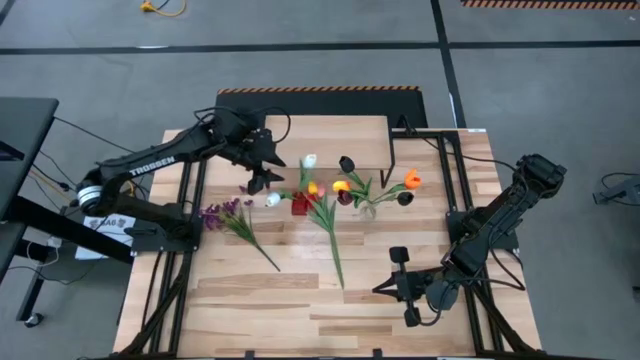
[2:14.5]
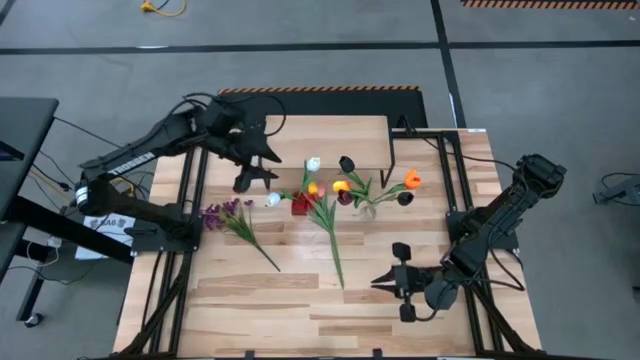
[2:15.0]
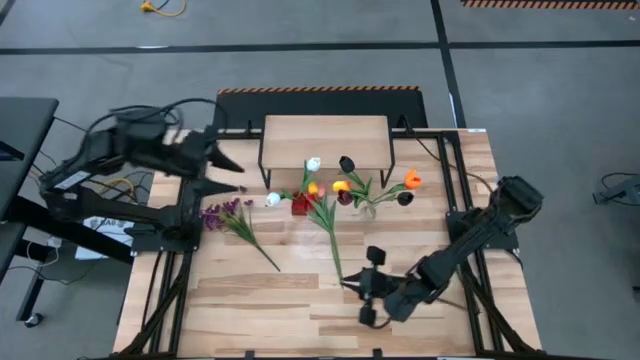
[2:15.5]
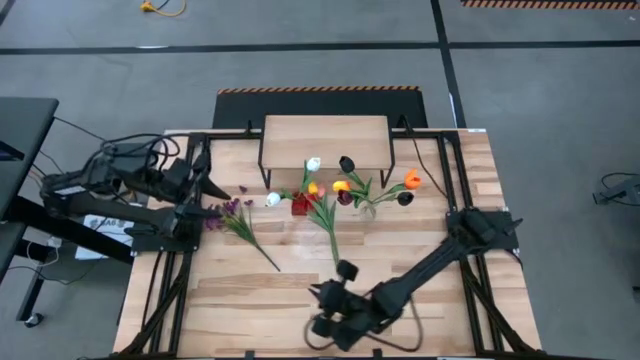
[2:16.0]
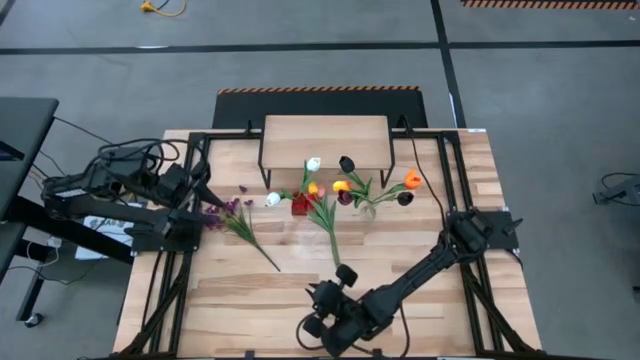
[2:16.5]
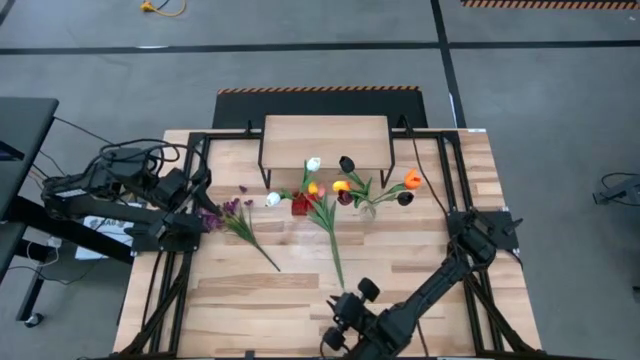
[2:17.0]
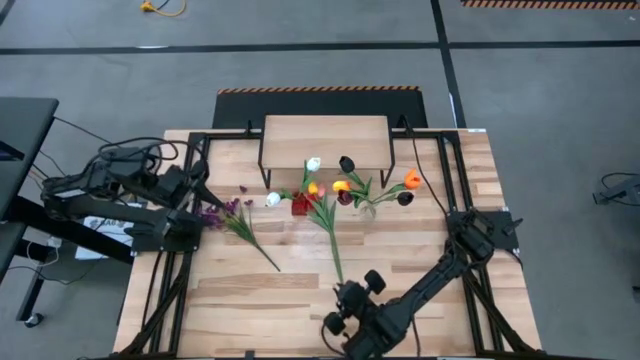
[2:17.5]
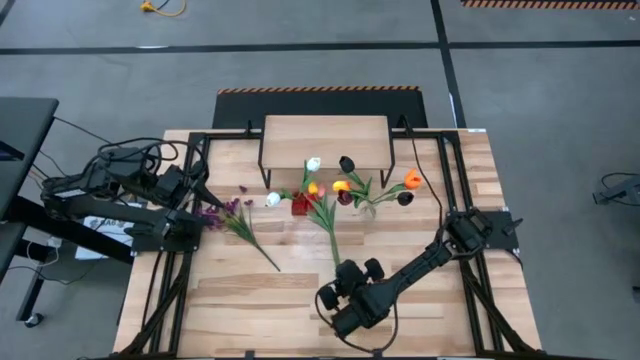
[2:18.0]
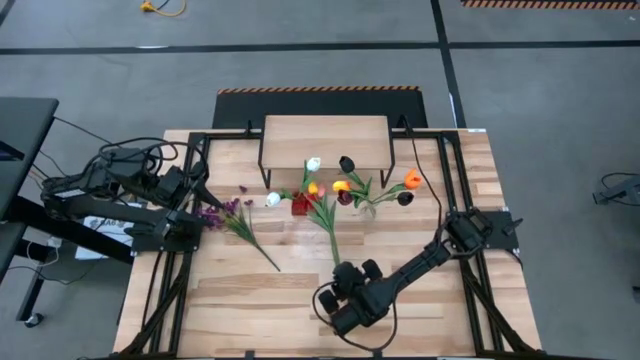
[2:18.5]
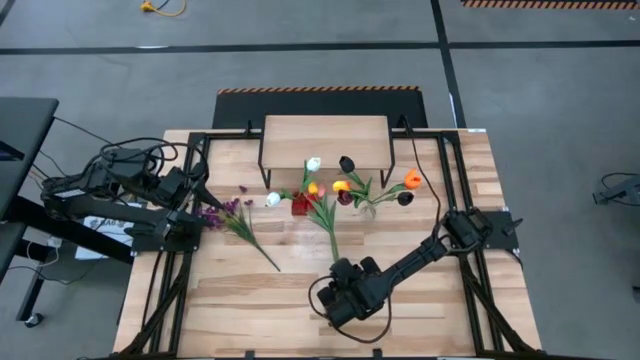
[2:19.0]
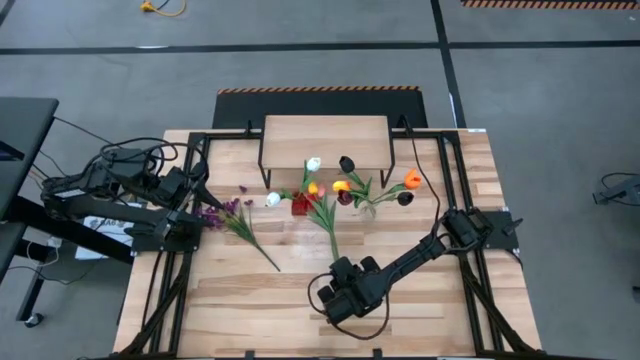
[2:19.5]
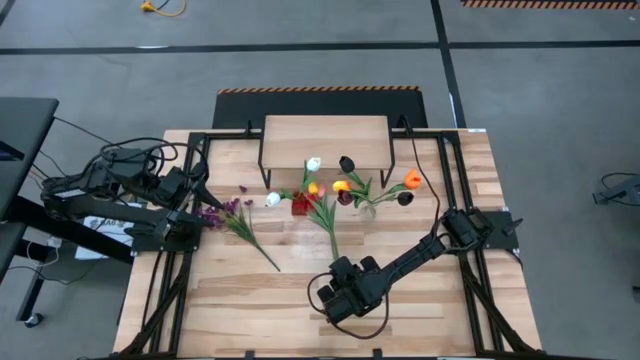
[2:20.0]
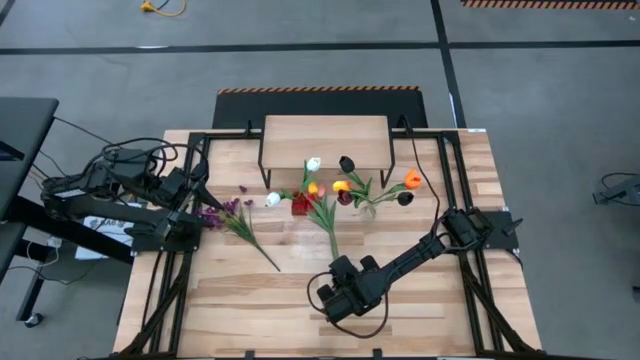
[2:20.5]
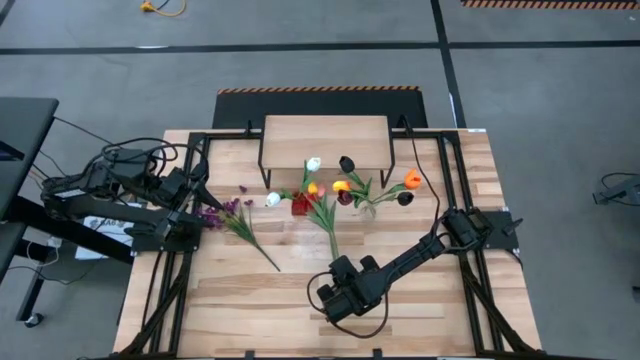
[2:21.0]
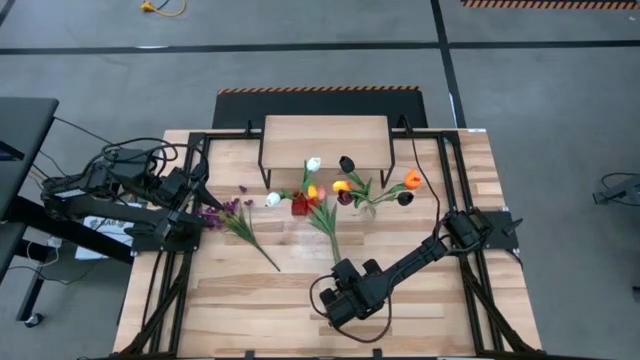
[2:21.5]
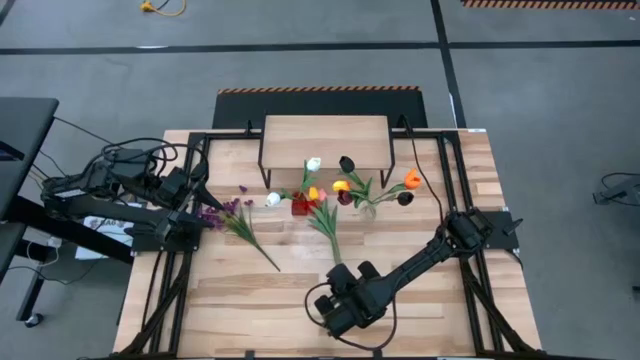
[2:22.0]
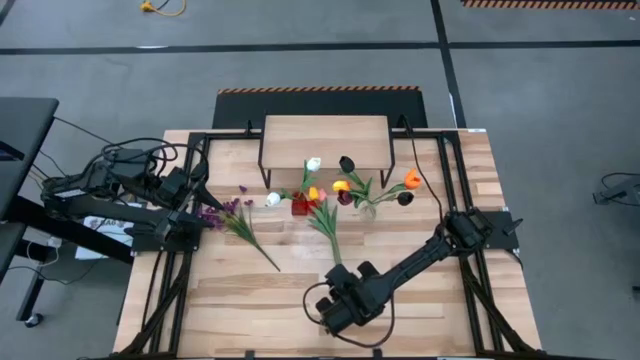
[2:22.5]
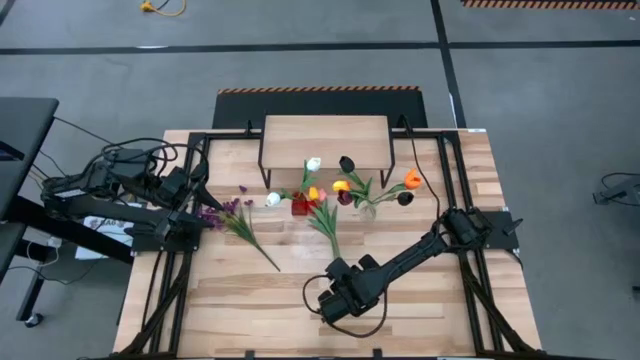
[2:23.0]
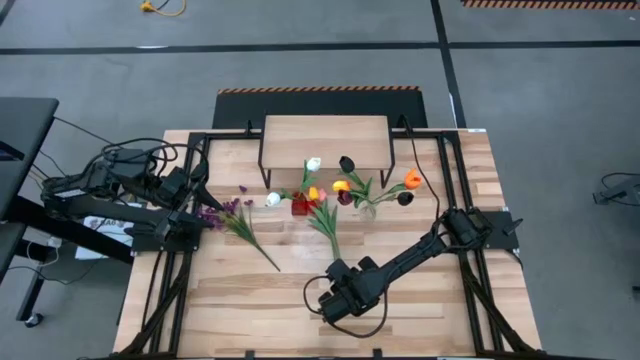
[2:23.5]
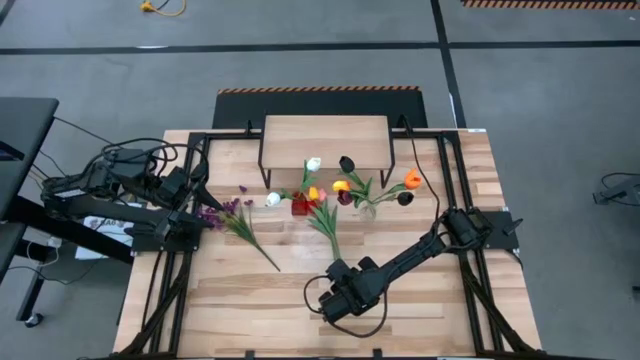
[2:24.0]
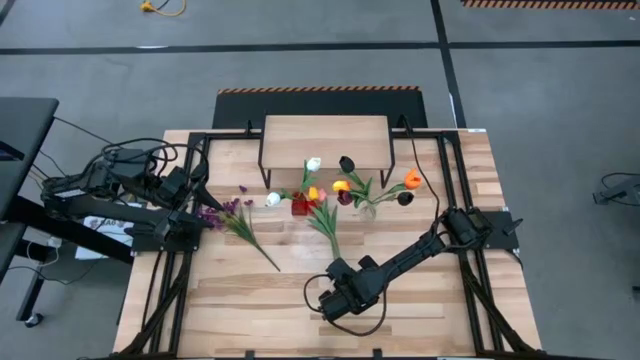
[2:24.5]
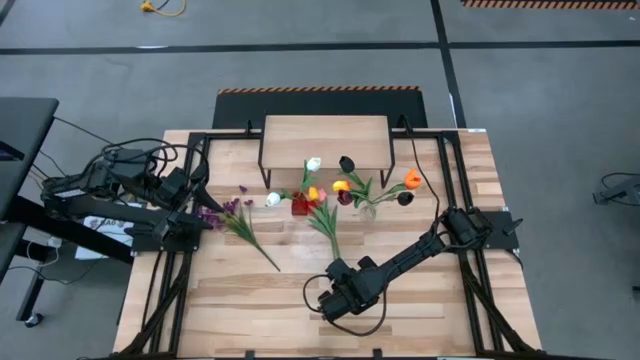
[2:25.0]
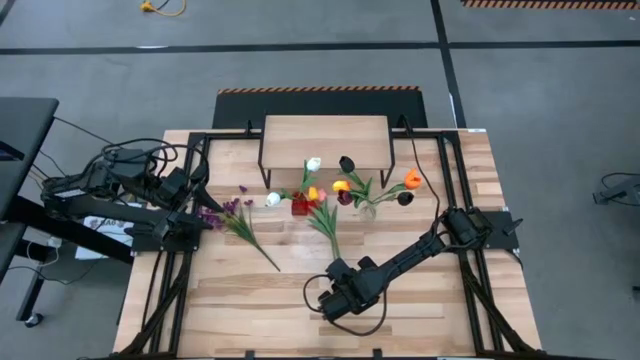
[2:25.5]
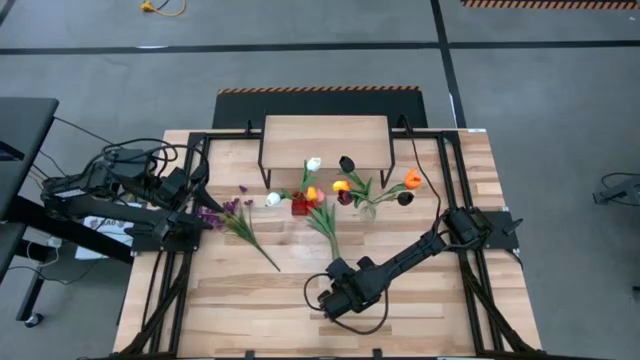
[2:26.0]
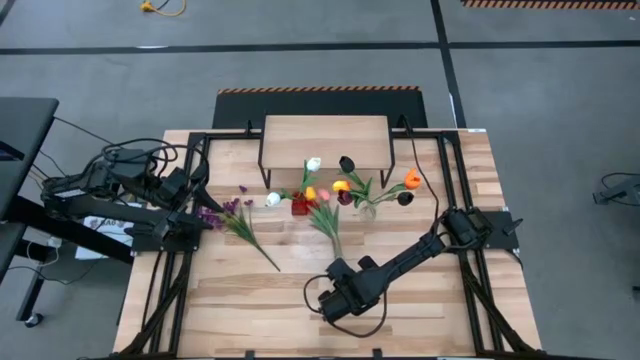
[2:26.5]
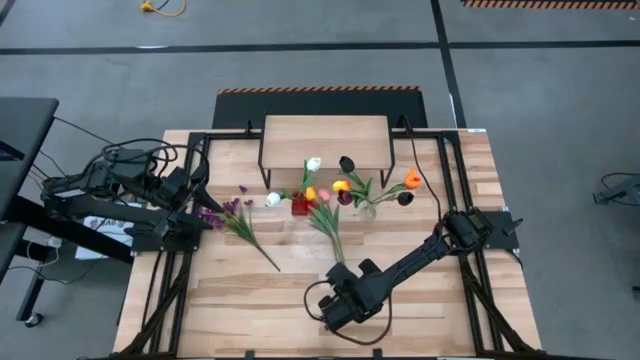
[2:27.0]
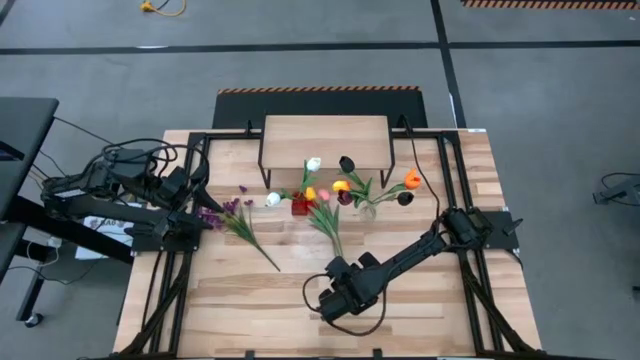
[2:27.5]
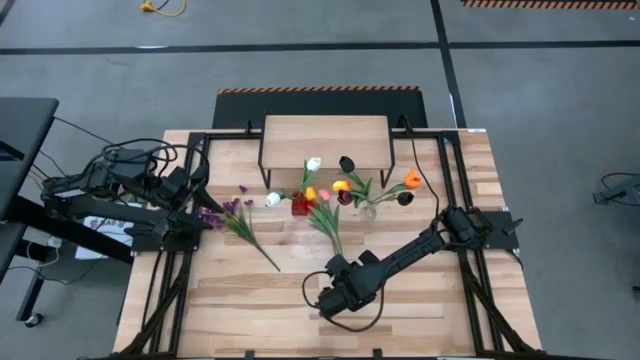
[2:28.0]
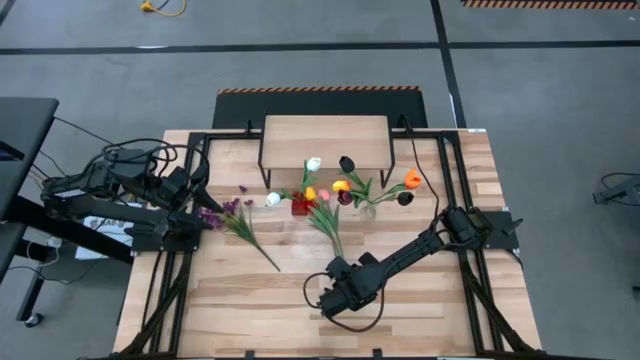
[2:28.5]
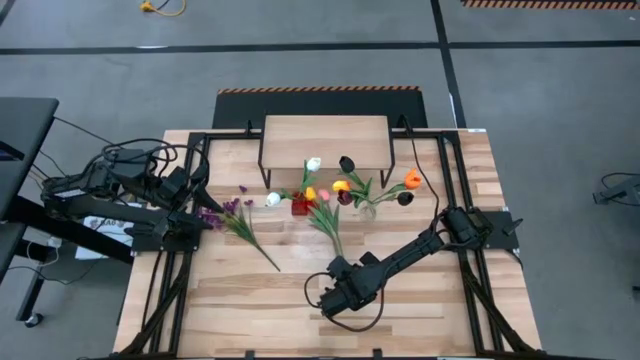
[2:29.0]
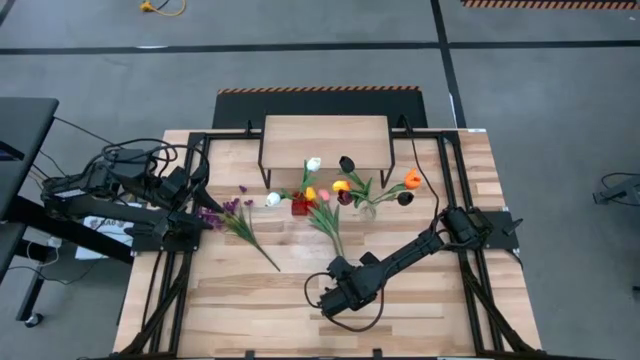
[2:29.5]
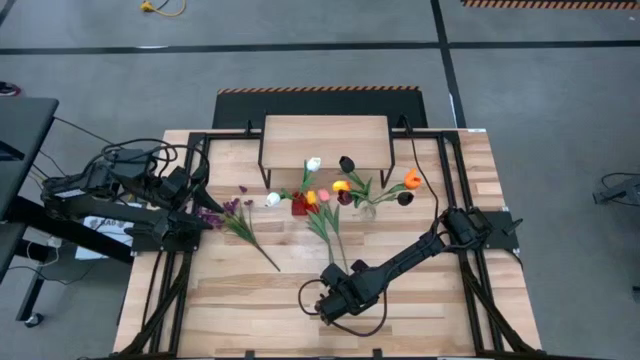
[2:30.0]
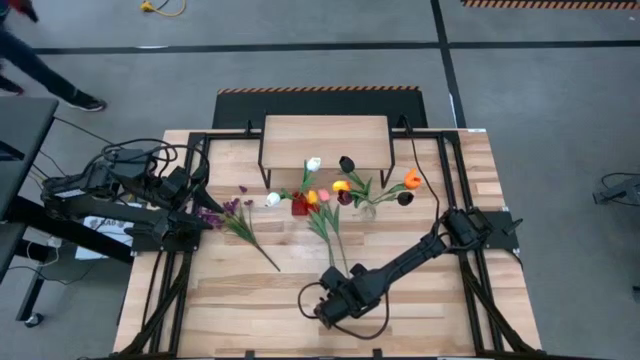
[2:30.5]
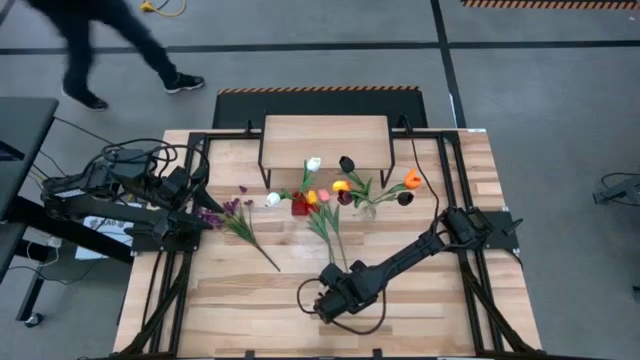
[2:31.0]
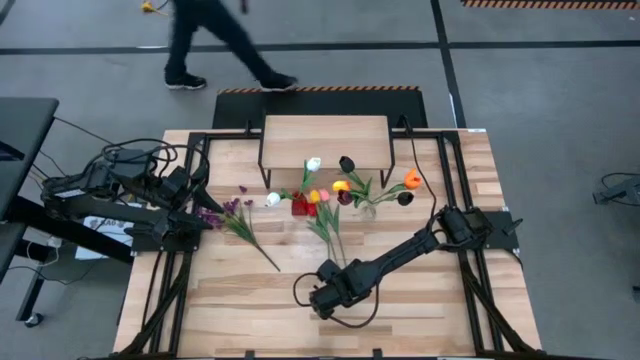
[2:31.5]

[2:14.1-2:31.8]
Task: Pick and place flowers into a vace then onto a shelf
Put the red flower into the transparent vase

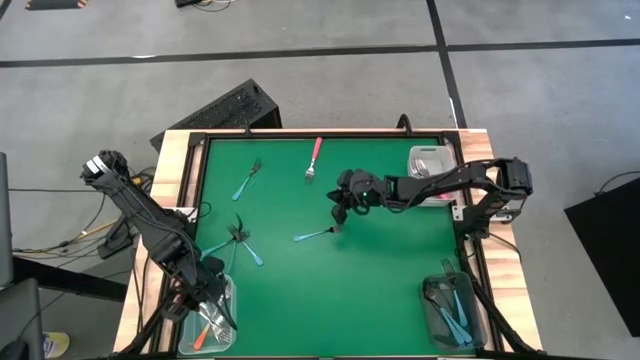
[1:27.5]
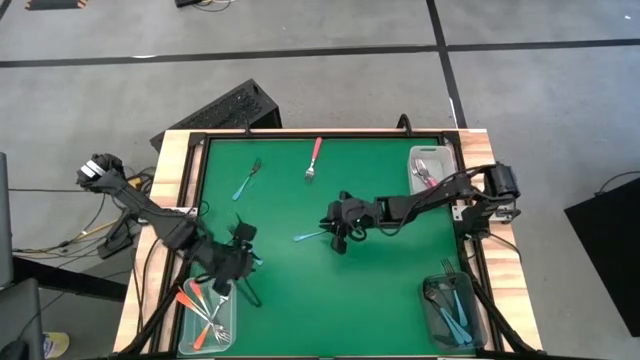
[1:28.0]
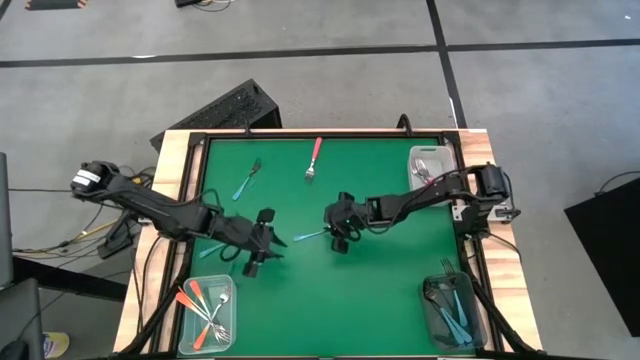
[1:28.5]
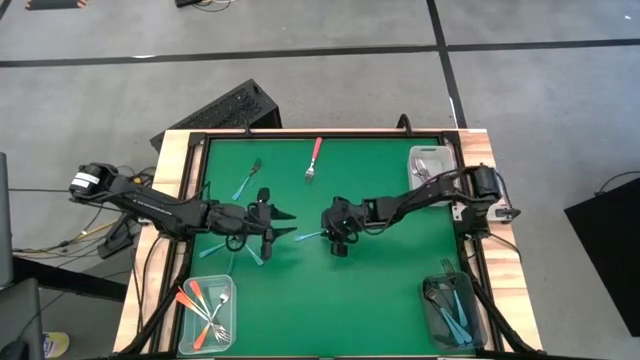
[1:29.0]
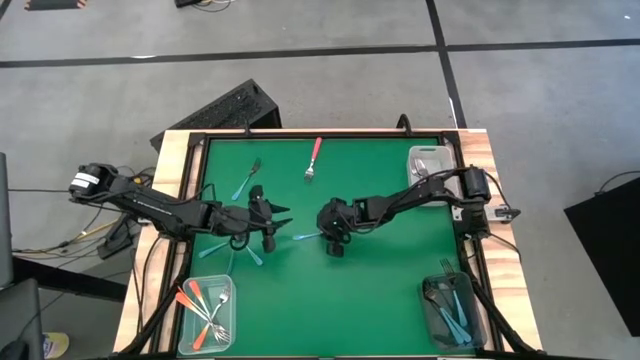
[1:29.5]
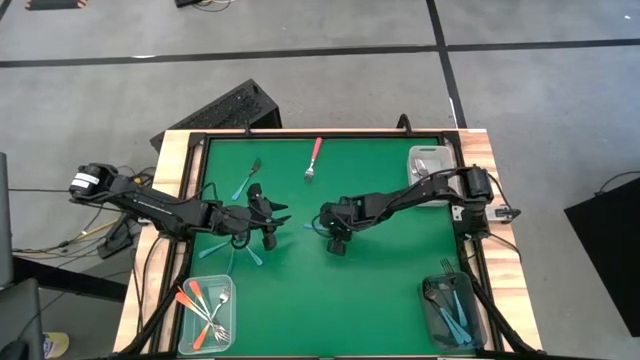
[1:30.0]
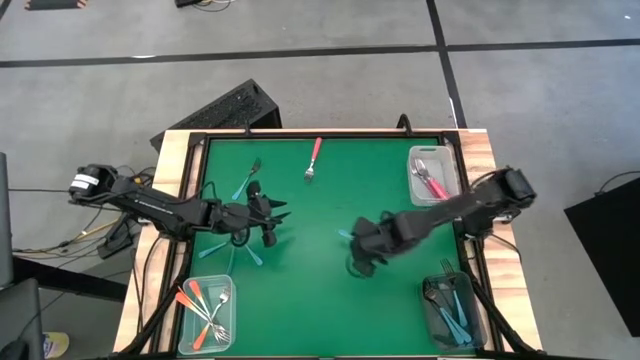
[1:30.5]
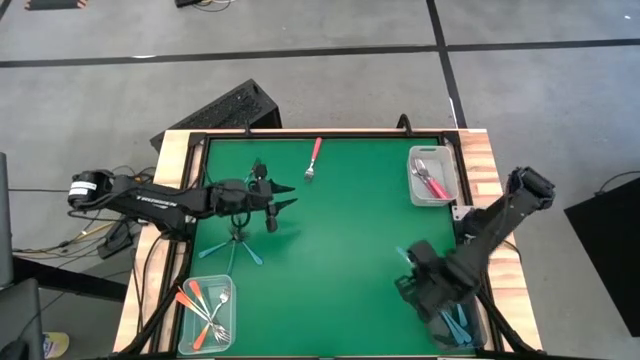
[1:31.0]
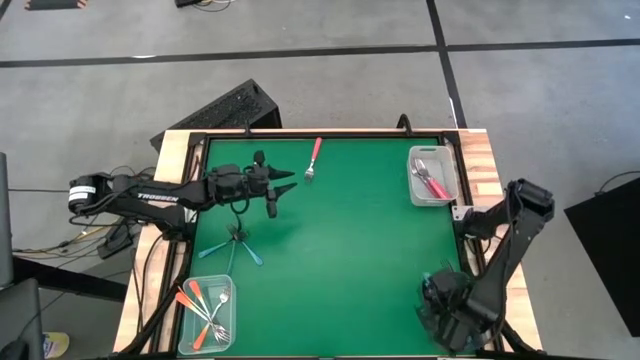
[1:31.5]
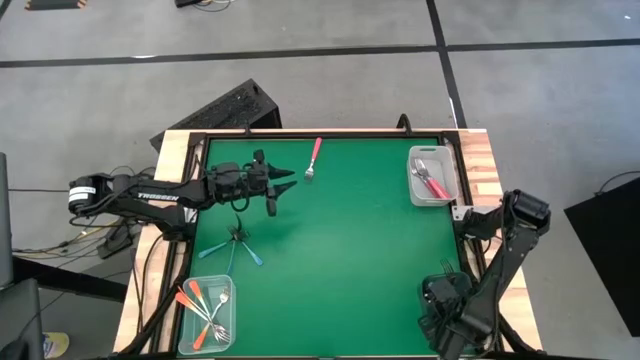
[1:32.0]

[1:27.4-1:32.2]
Task: Sort silverware by color (type)
Put the blue fork into the black bin
